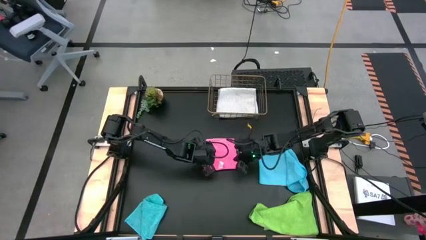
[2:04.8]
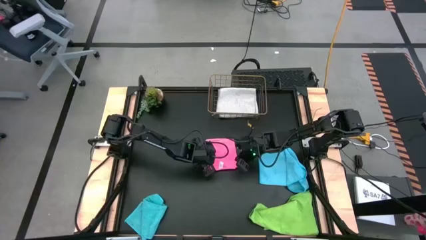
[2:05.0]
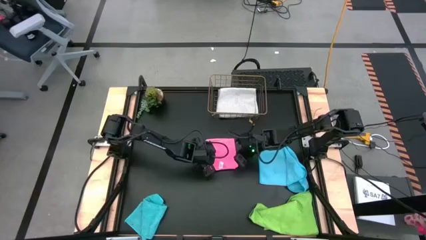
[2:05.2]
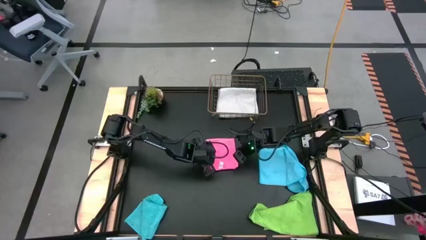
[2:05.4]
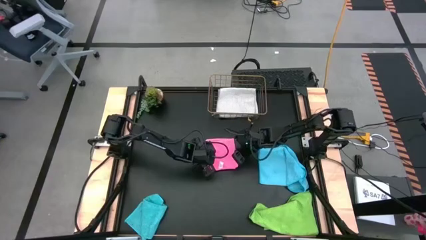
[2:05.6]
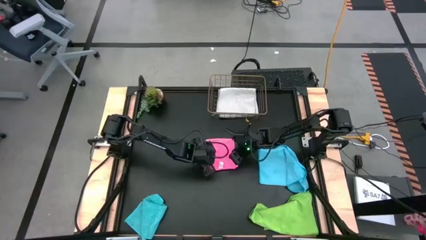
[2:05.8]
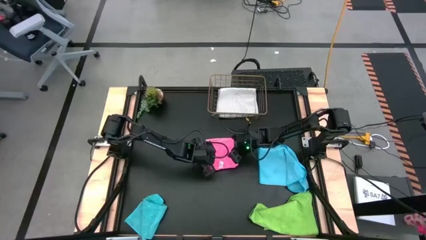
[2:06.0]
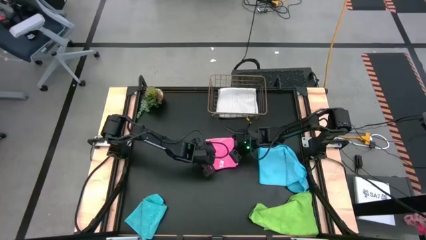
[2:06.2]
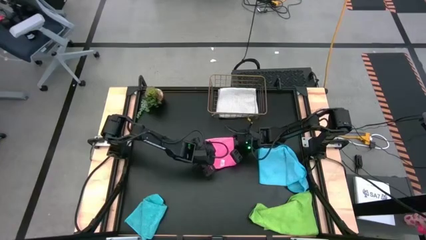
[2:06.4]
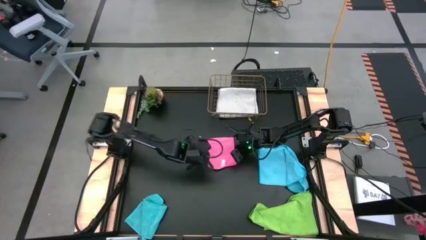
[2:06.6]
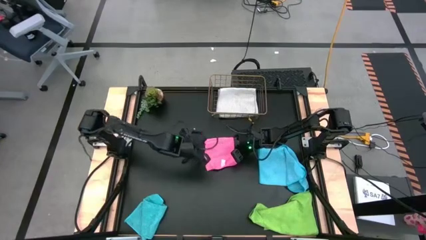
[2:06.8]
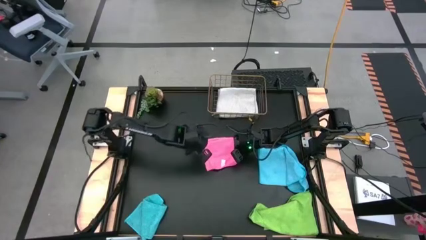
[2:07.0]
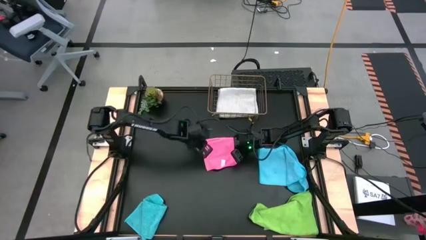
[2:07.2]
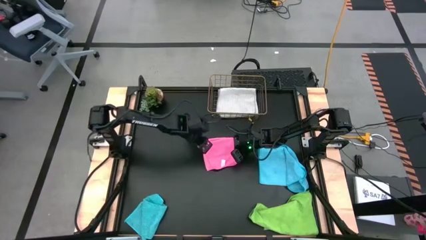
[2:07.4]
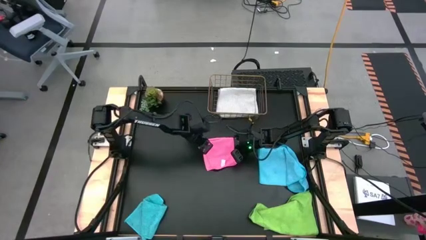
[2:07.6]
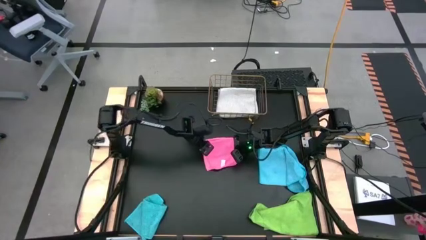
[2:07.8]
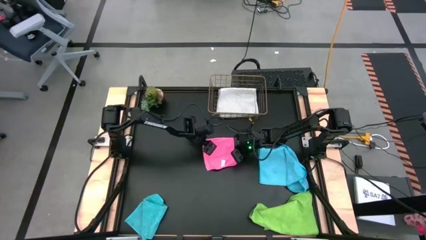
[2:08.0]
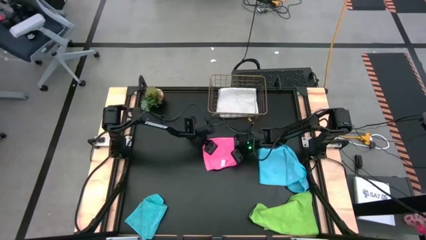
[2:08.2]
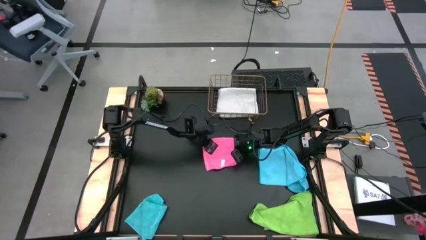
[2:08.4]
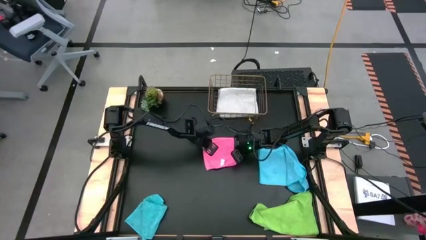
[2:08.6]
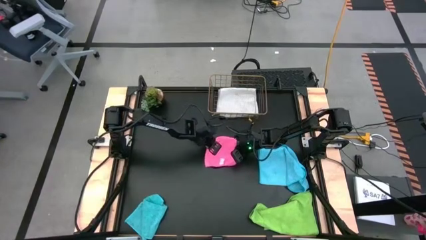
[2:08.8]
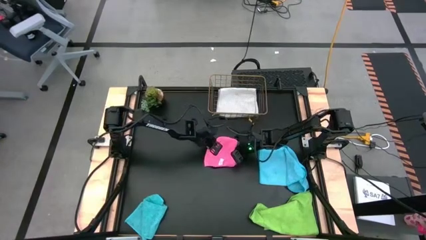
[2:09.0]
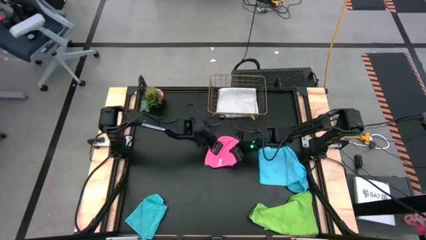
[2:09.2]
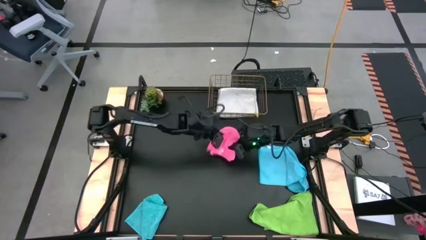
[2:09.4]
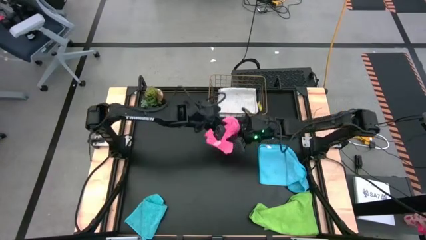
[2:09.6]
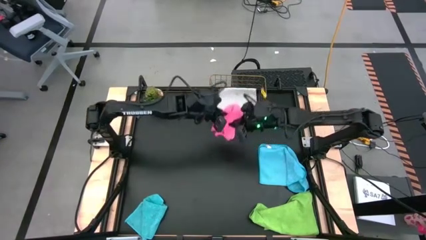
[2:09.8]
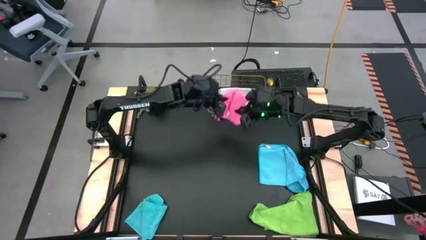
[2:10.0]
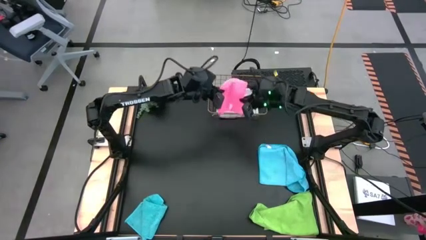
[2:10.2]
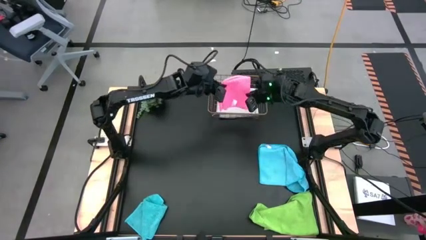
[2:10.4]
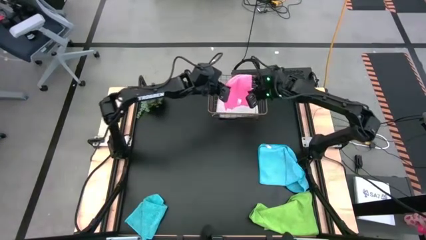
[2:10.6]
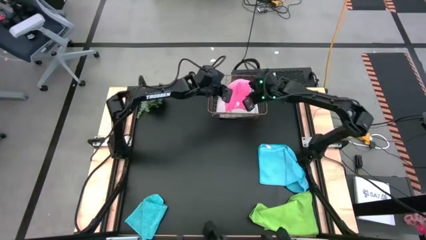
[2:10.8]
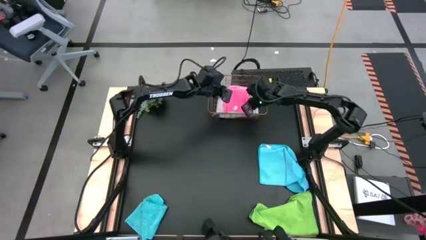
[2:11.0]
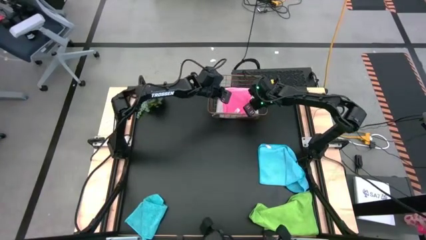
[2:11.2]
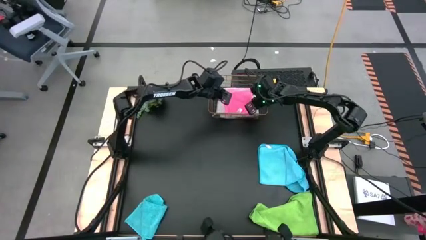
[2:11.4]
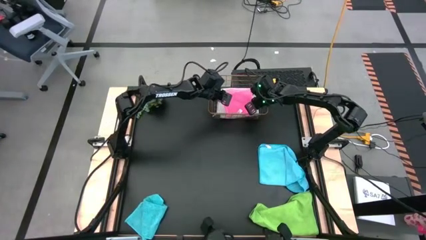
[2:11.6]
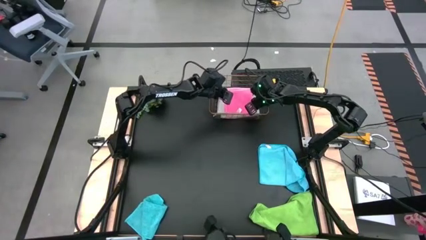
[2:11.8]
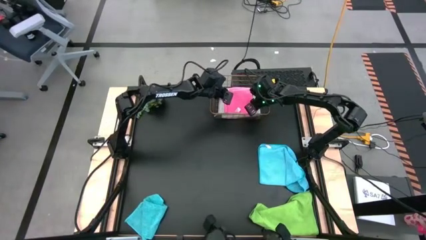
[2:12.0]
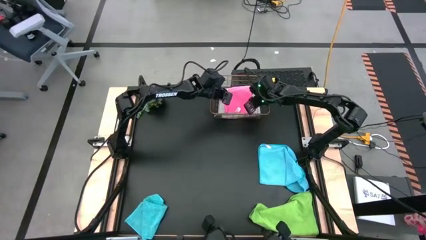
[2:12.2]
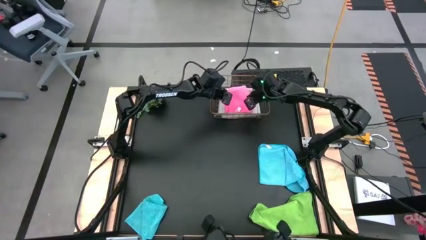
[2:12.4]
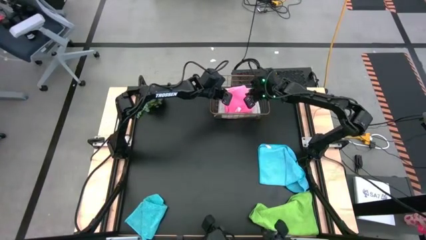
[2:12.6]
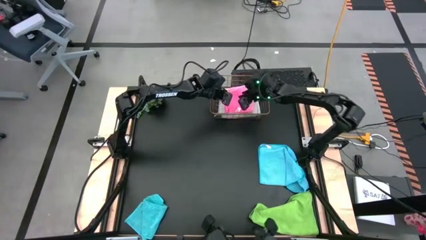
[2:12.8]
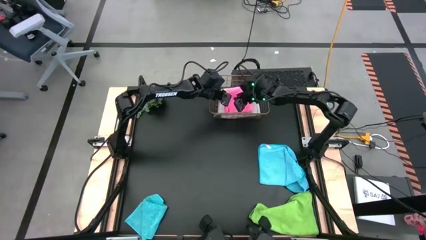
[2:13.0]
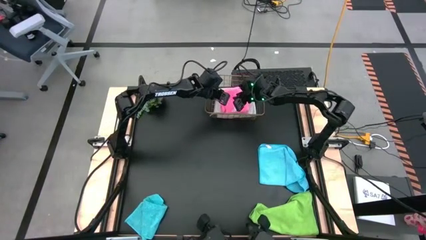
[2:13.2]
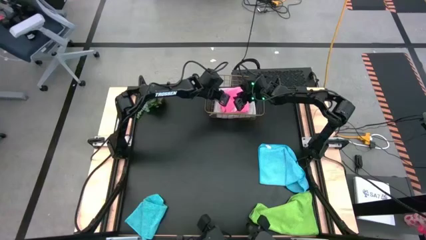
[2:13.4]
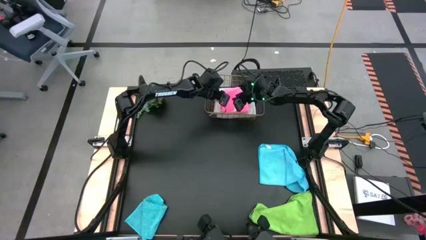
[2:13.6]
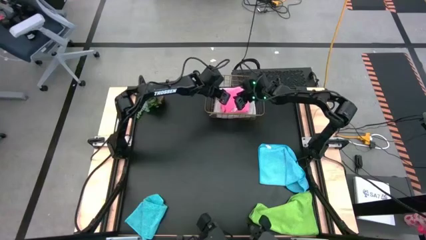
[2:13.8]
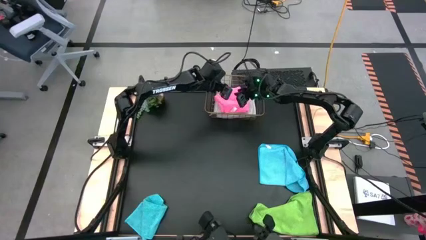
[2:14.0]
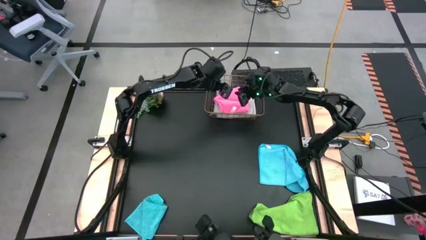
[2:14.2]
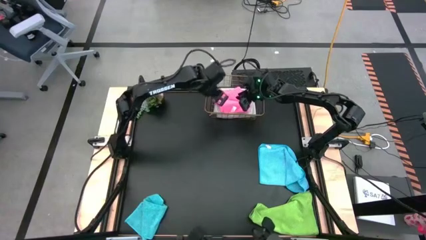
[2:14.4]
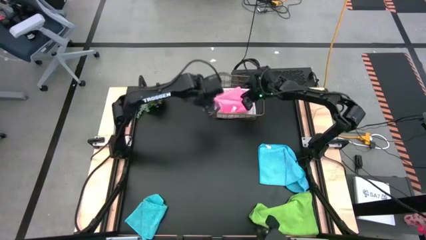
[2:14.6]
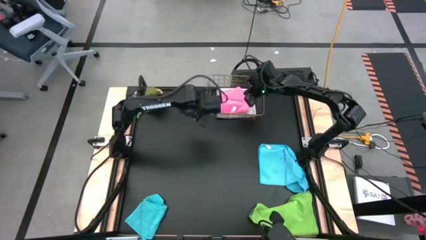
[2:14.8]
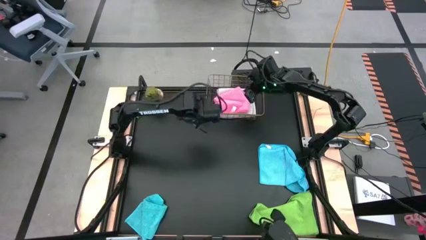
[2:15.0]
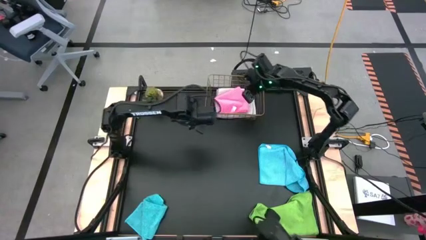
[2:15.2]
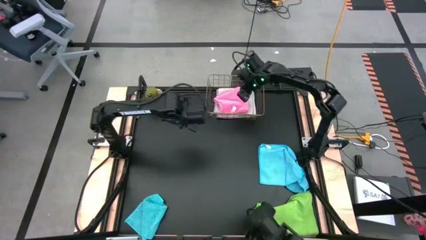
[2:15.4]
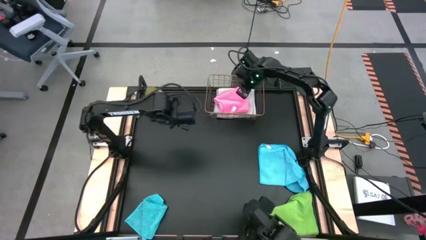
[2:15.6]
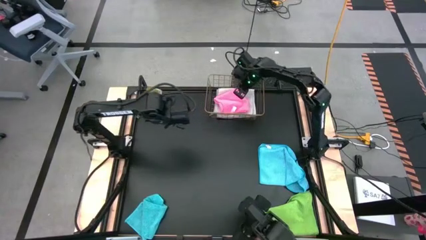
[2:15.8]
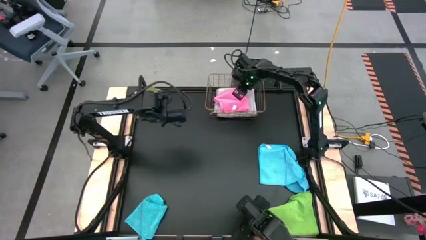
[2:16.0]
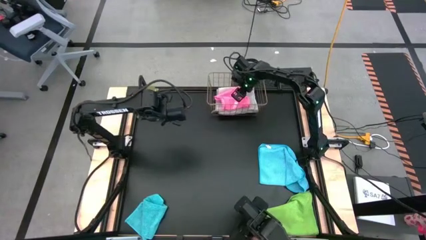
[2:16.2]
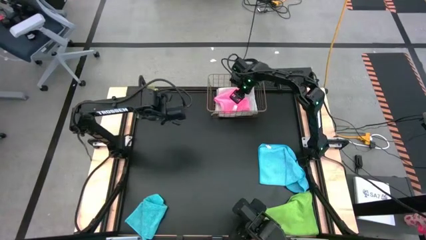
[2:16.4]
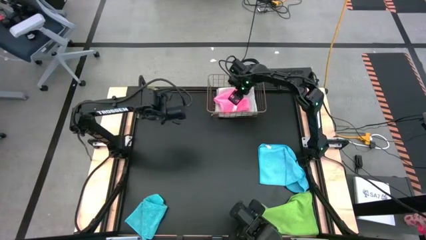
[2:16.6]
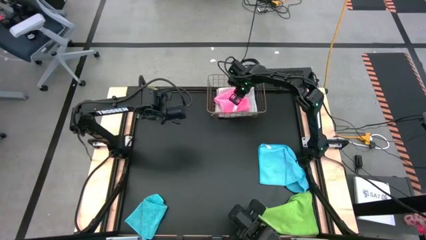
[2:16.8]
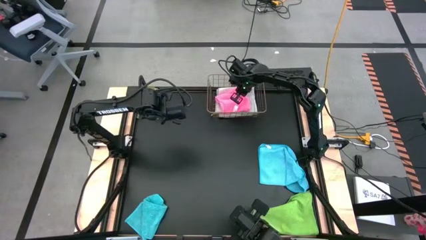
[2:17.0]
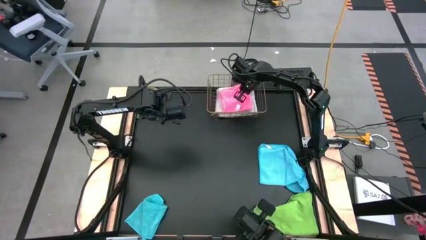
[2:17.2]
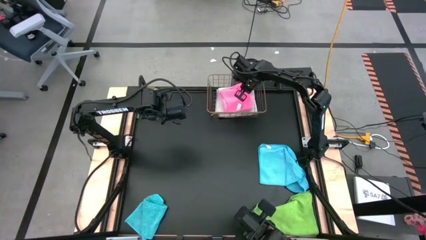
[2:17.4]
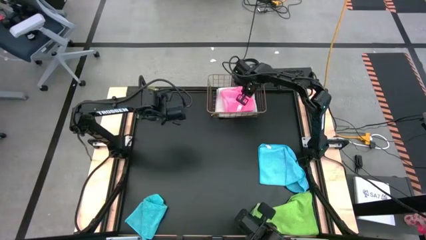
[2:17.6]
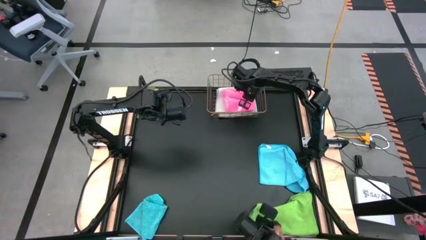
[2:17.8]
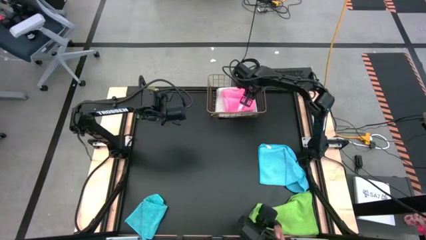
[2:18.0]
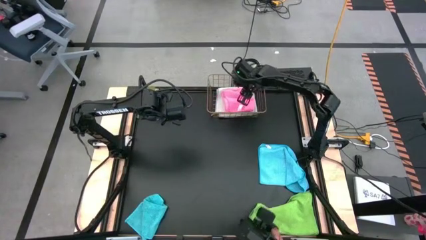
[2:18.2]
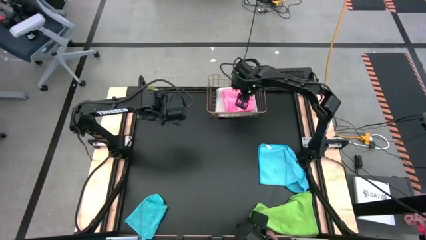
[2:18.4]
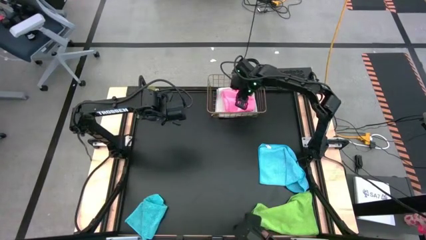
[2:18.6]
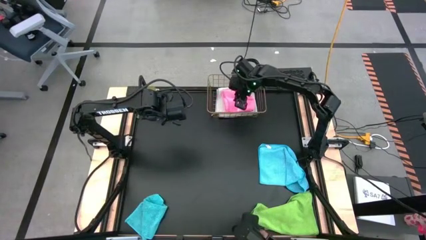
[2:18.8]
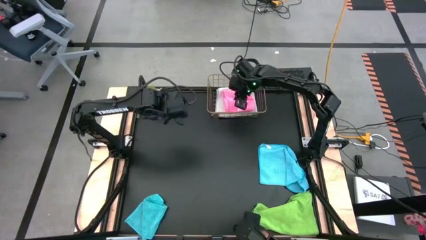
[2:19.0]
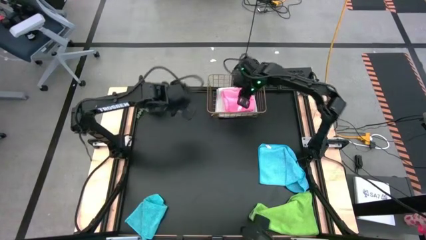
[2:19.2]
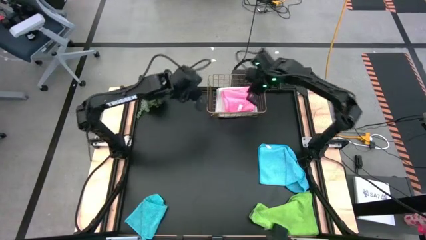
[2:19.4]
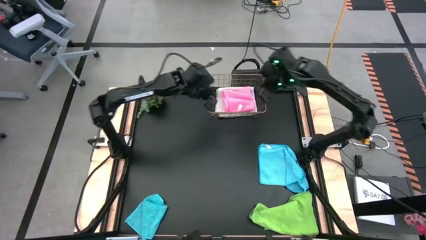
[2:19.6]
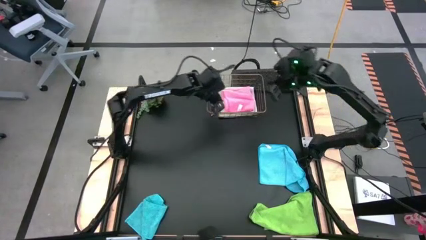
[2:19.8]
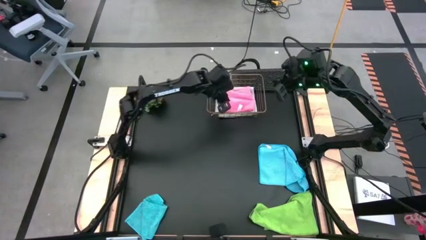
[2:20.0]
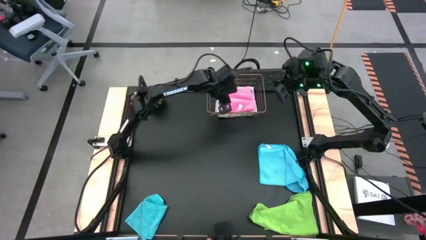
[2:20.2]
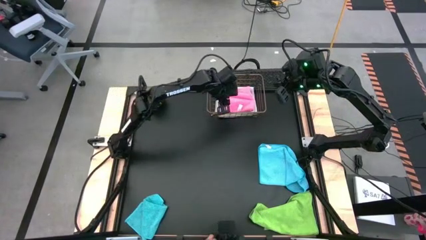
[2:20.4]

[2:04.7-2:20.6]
Task: Fold microfiber towels
Put the pink towel into the wire basket
